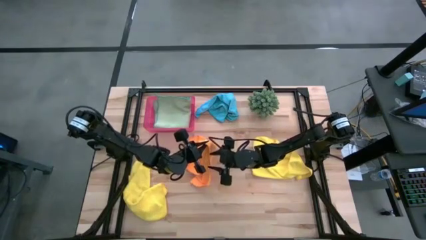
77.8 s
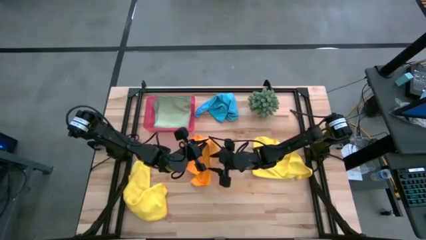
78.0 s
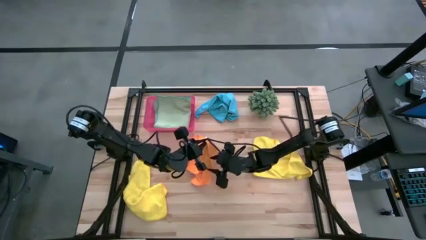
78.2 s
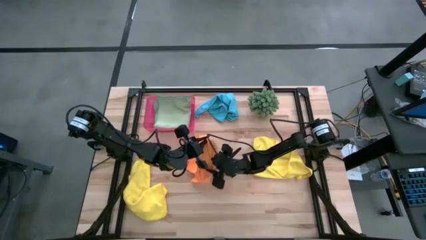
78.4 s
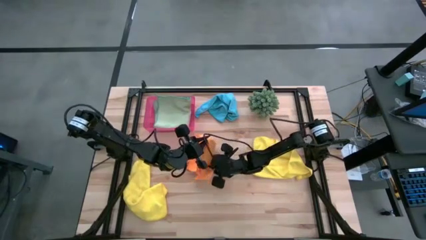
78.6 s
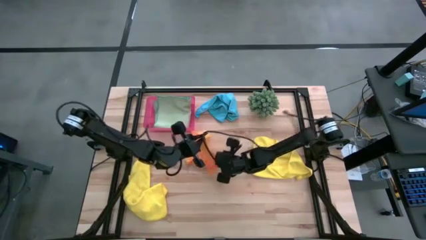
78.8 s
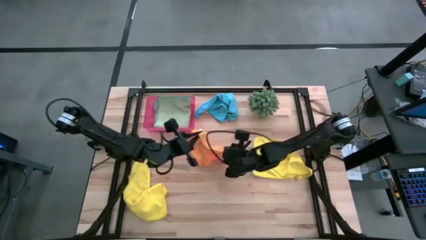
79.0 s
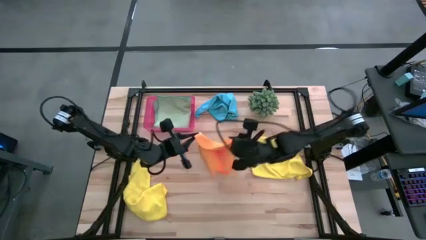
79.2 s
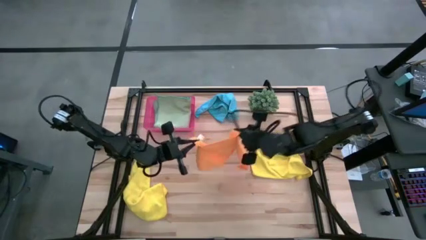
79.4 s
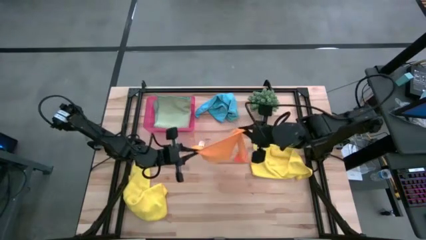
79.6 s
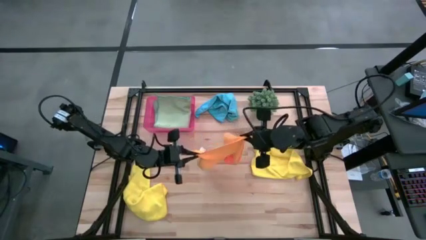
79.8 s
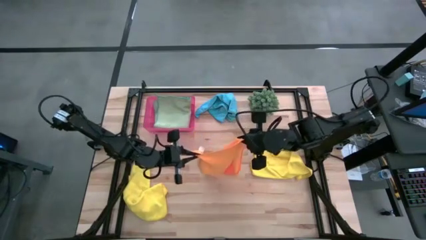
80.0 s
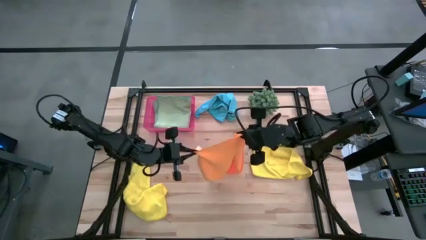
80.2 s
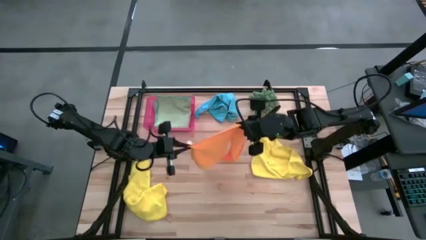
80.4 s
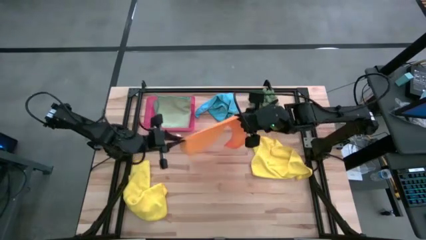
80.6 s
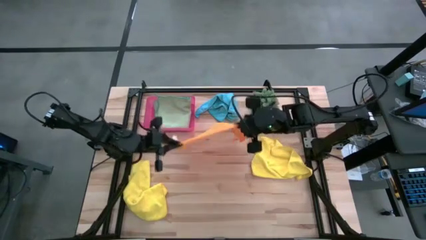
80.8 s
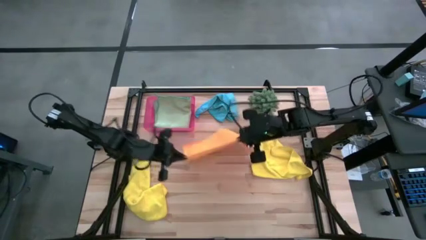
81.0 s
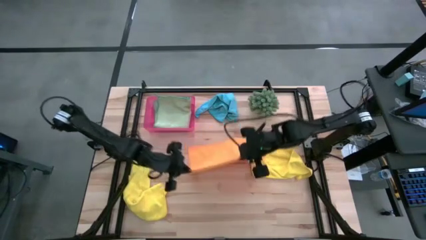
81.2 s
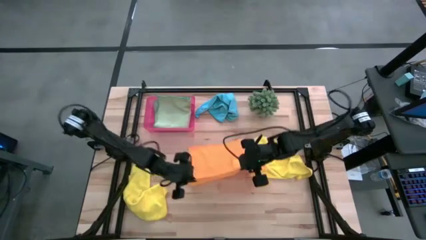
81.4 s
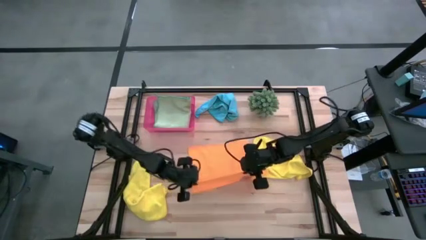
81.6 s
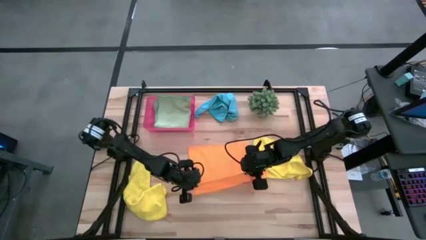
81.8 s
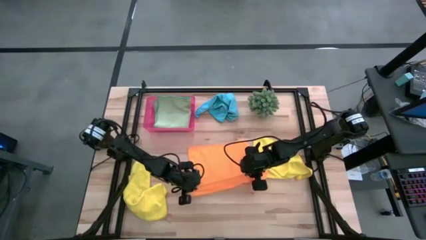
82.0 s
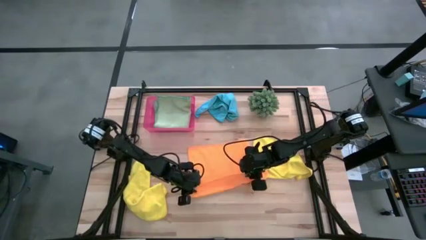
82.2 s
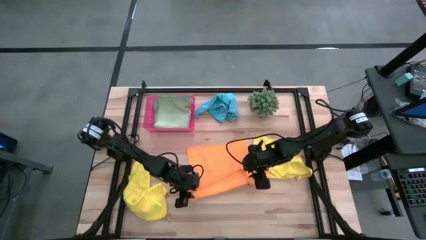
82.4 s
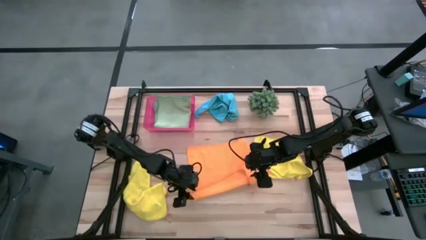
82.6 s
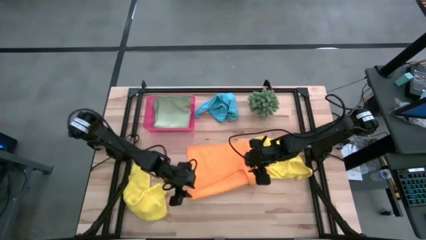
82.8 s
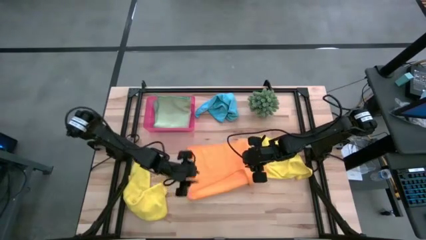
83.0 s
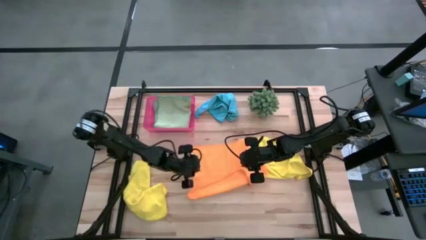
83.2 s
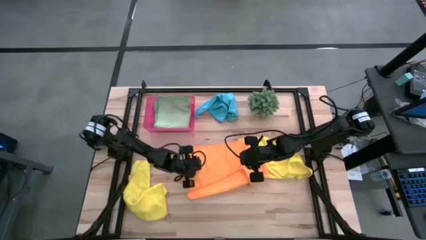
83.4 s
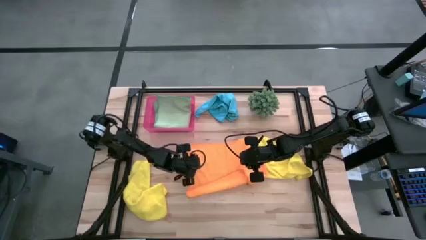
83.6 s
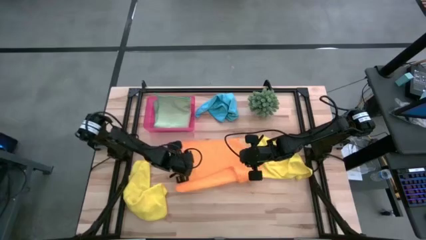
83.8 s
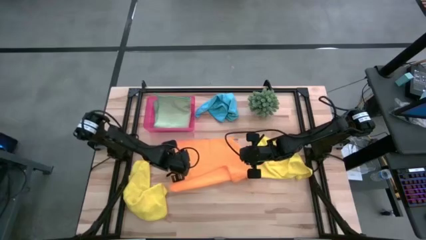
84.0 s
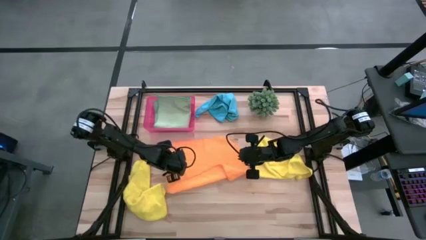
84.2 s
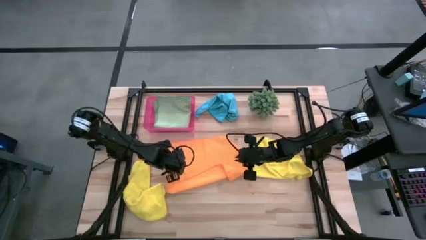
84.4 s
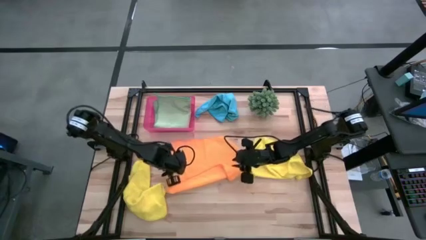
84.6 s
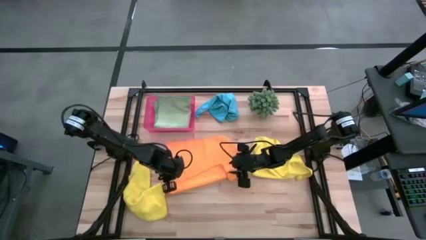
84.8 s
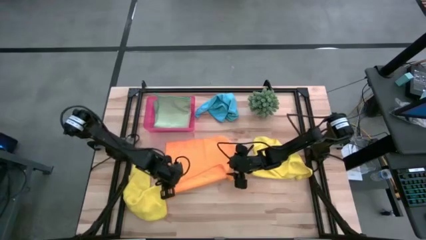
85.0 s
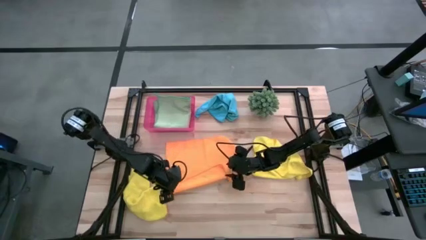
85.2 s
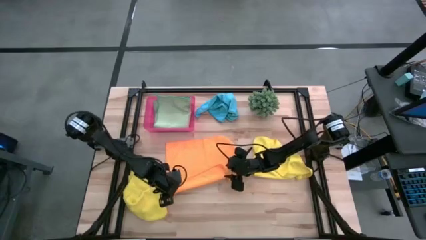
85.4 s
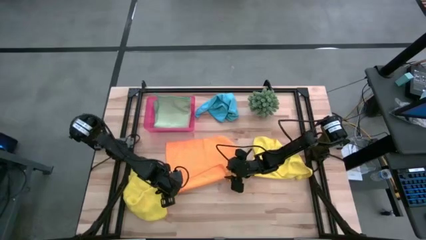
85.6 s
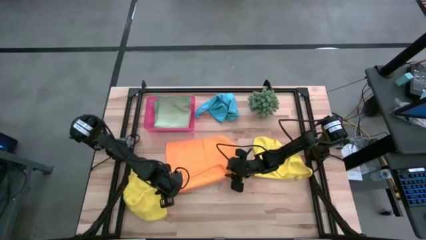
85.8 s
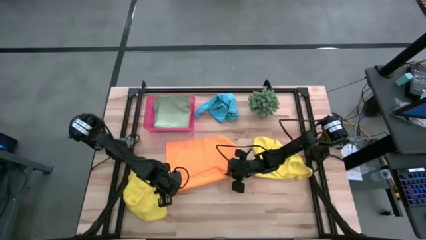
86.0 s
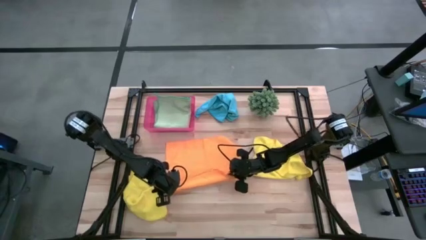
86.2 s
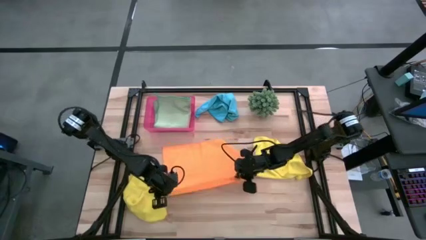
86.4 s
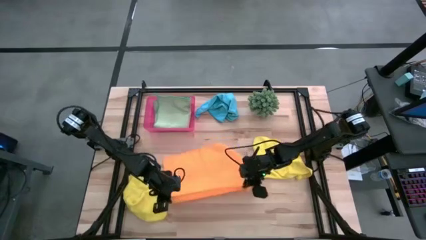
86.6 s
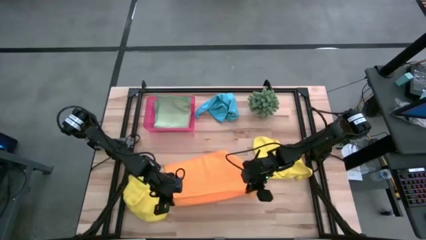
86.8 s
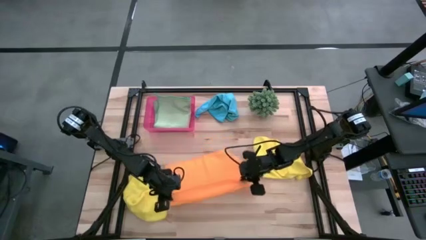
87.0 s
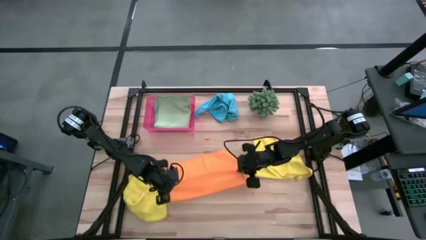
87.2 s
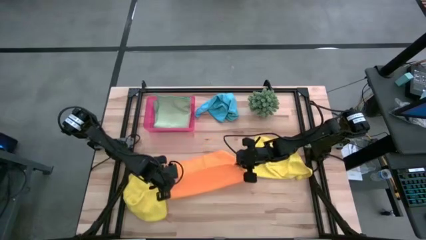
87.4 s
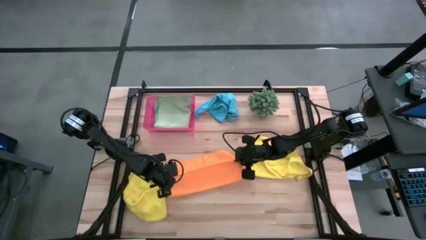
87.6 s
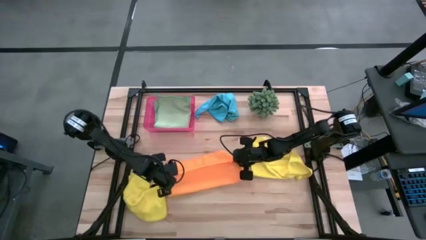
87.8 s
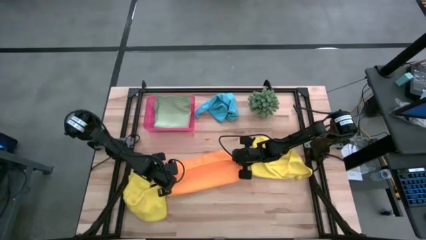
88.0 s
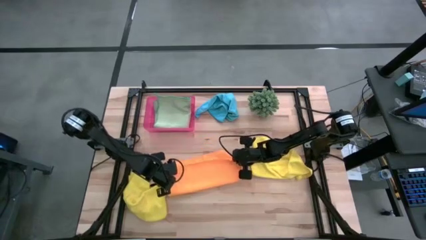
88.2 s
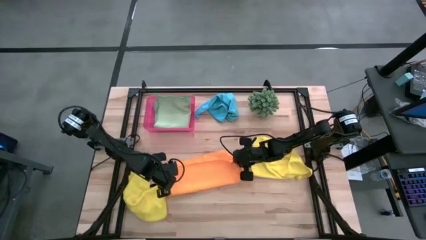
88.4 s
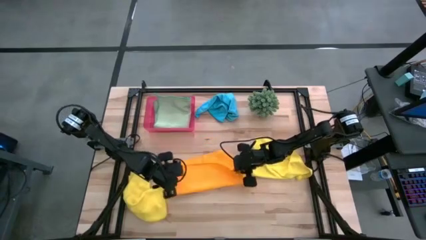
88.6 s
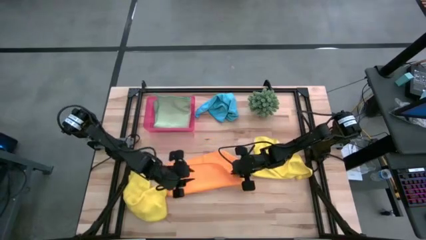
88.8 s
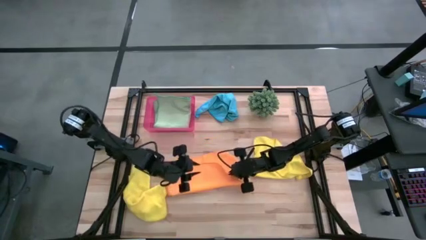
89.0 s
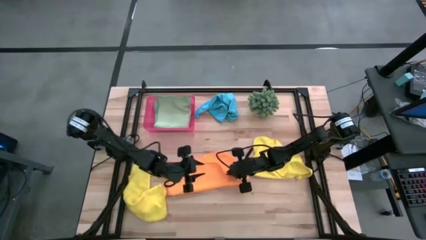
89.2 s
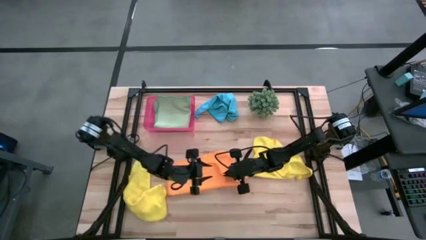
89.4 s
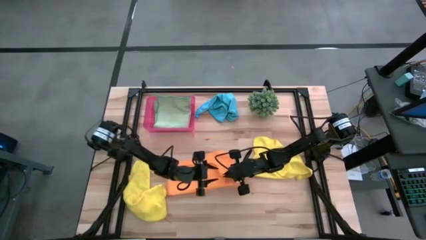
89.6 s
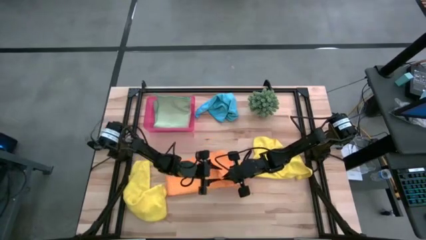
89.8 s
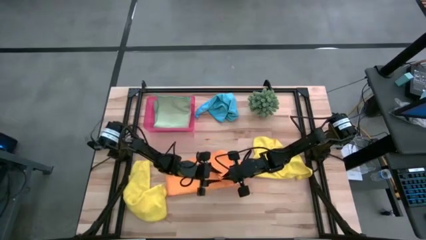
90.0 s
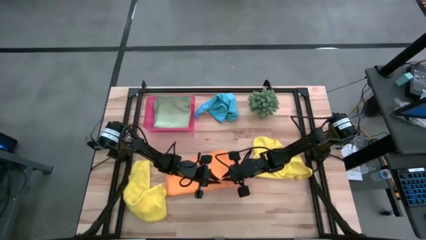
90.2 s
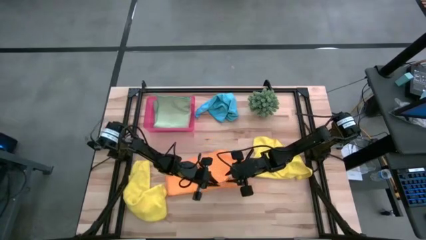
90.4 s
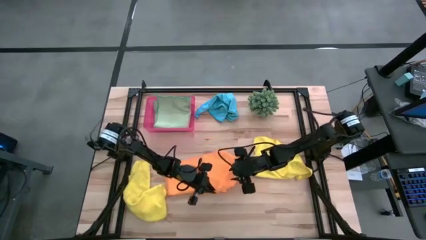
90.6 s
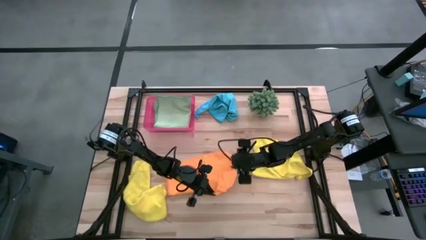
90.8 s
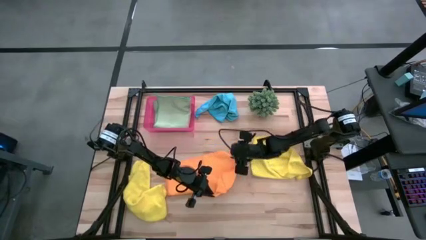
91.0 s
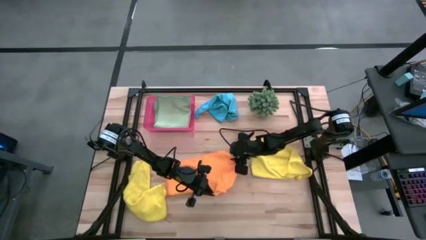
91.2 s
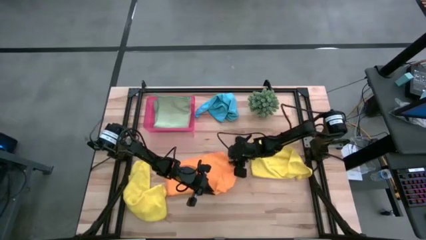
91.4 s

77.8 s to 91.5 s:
Task: Fold microfiber towels
Fold the orange towel
